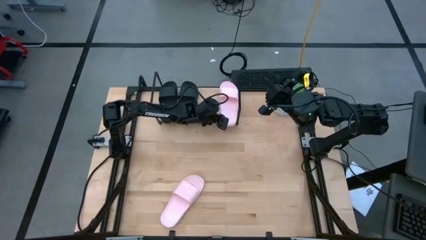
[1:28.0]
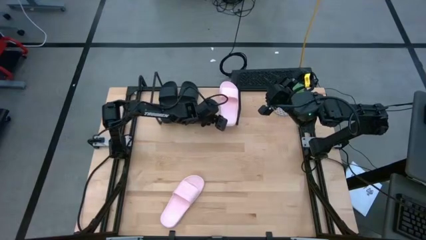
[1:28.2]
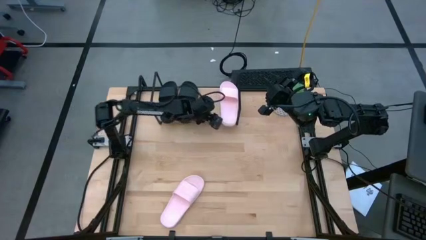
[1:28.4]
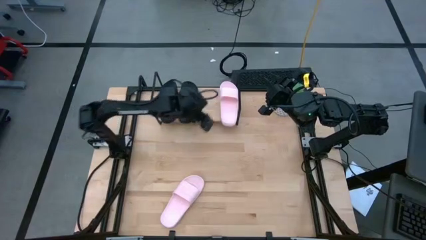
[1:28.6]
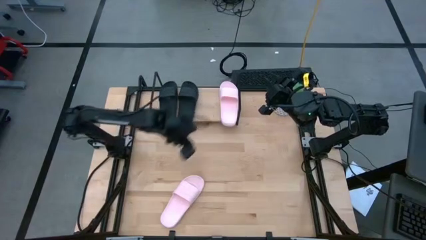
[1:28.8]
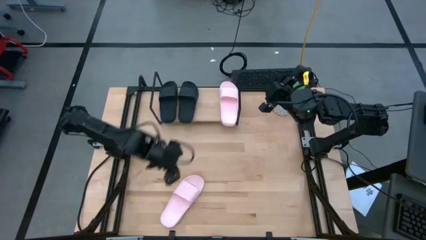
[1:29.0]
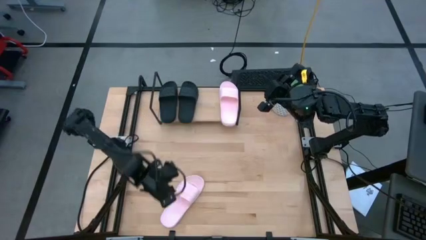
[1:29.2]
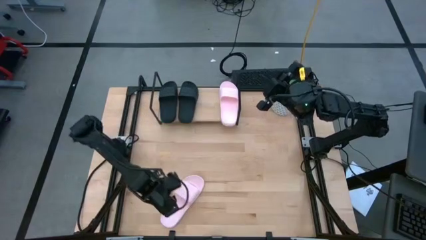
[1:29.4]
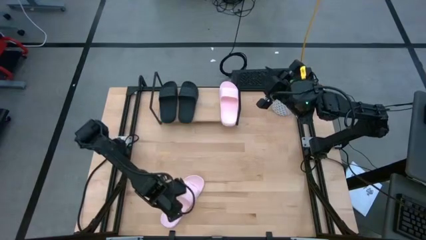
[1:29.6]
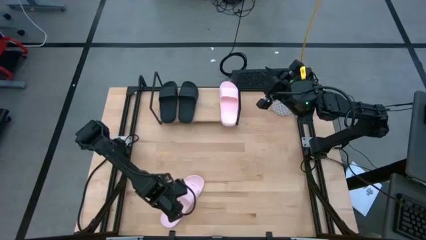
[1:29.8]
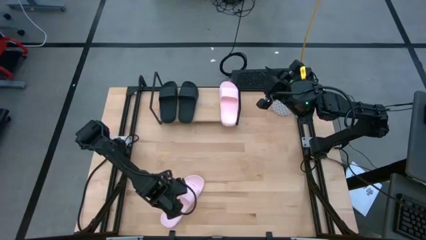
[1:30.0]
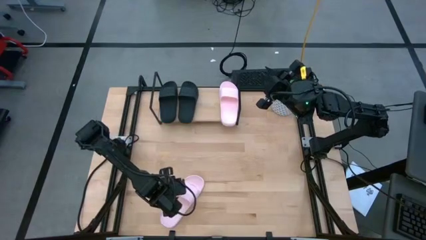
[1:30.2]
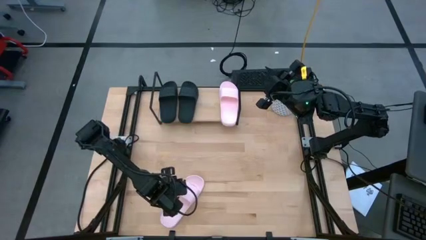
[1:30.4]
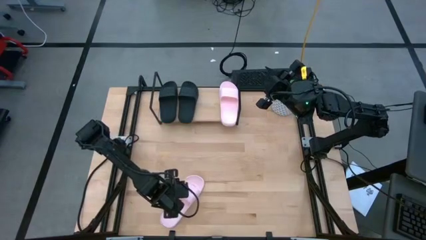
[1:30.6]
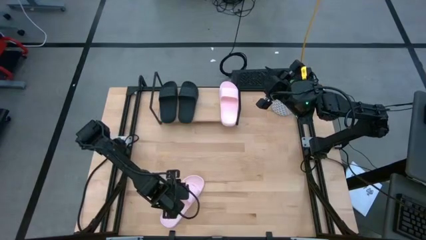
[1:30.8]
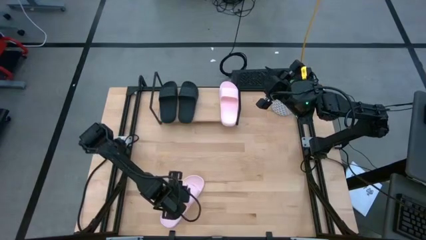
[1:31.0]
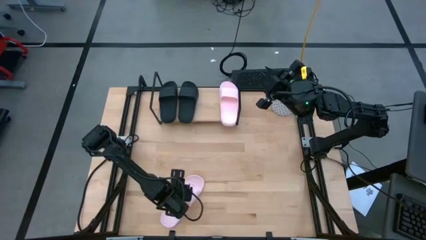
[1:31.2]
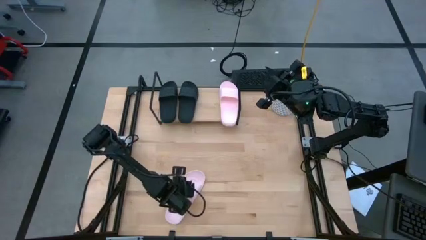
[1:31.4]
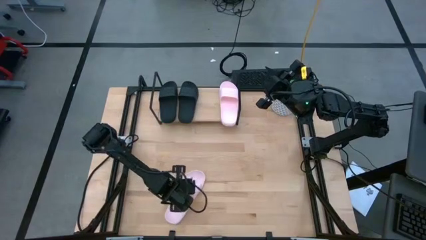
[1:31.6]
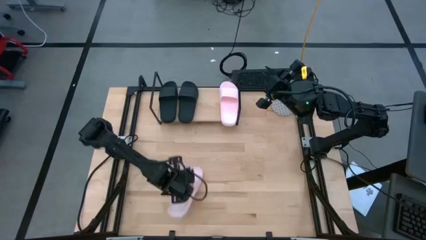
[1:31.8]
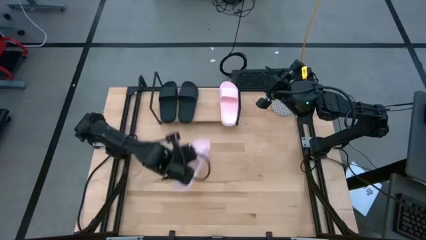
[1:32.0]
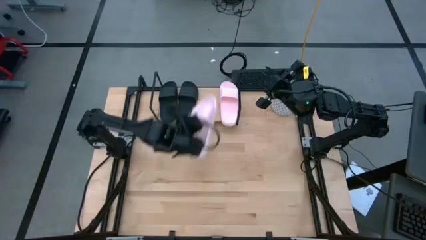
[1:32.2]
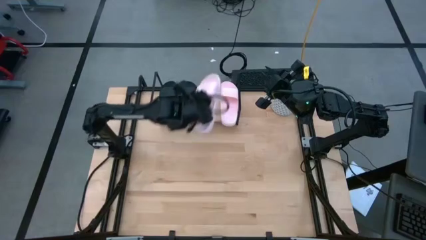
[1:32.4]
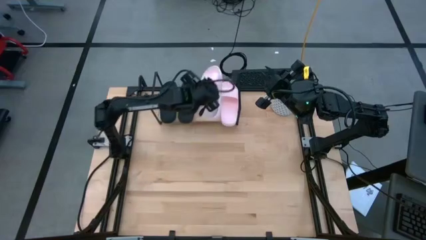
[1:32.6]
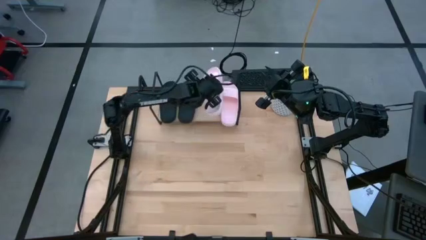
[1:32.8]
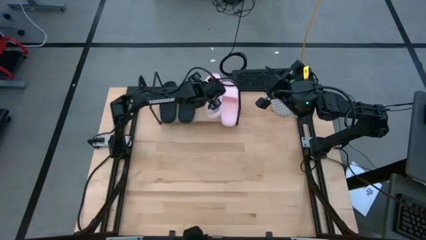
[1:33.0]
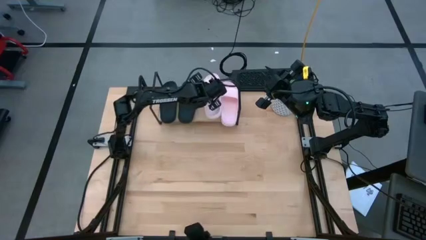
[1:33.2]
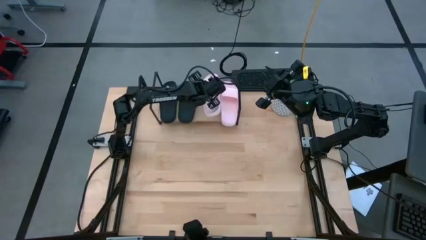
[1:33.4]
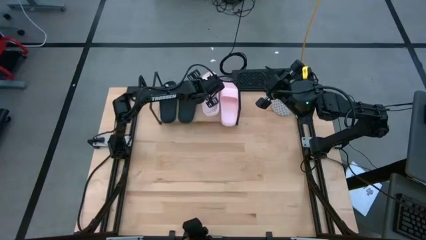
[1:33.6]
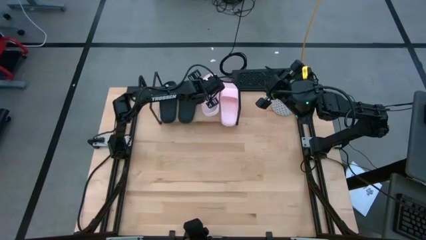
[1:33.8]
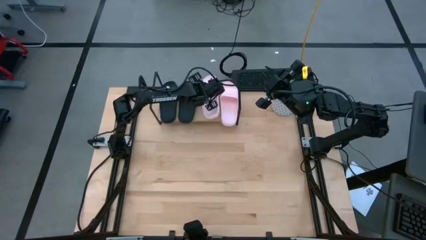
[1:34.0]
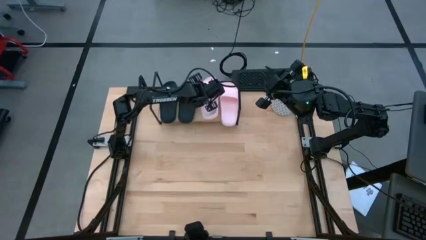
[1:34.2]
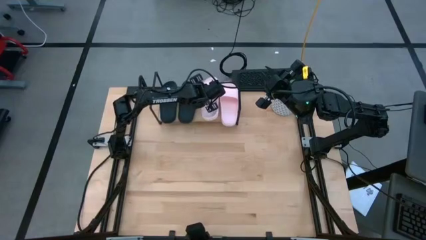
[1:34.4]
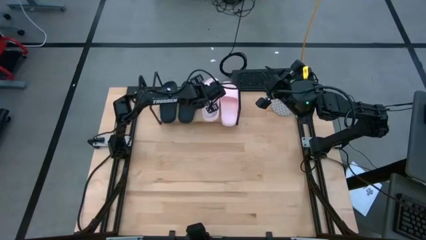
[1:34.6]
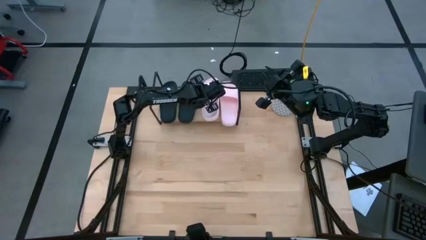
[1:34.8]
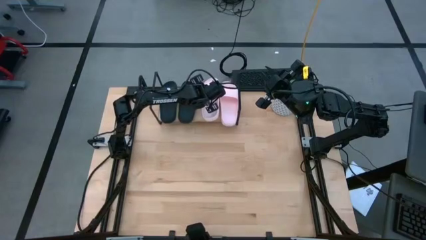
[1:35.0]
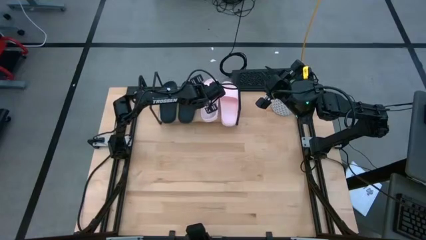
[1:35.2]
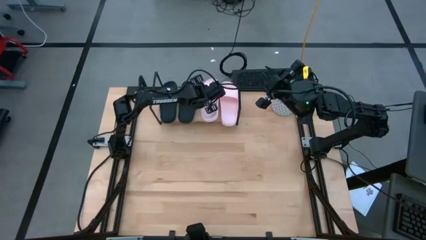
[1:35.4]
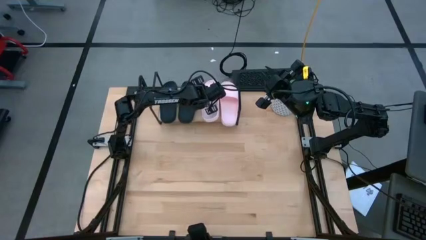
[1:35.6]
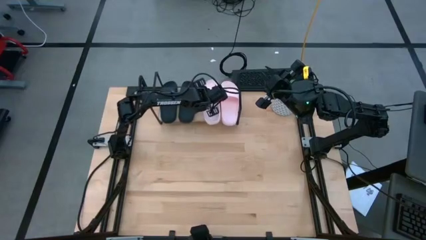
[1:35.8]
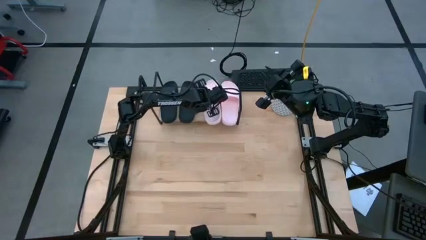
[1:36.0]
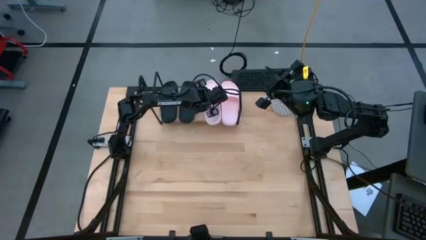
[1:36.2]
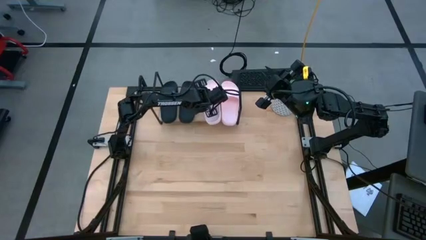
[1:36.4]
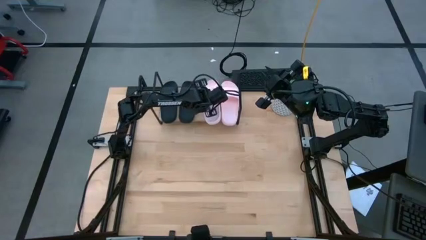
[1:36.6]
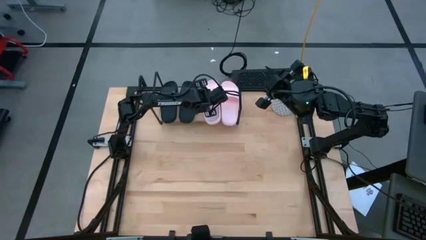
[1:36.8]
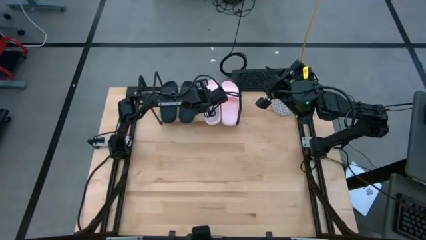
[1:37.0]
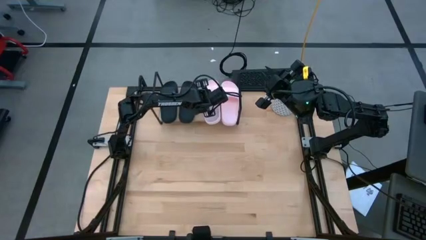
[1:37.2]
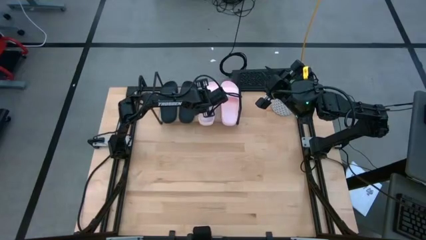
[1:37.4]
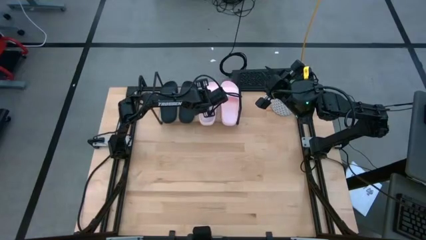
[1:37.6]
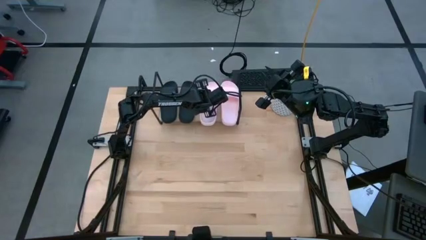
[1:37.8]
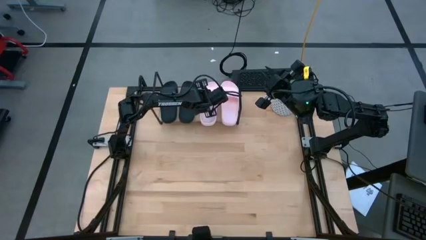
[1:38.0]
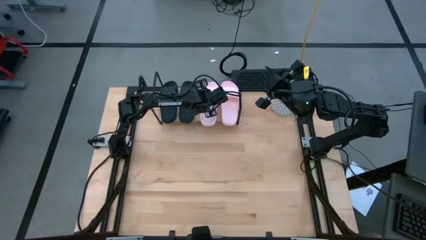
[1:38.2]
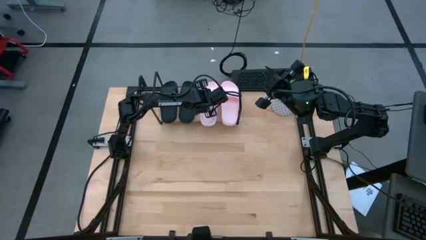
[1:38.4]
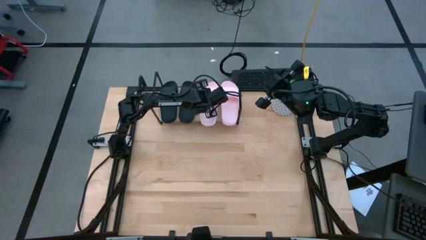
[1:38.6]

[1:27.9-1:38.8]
Task: Pick and place slides into the shelf
Put the pink slipper on the shelf

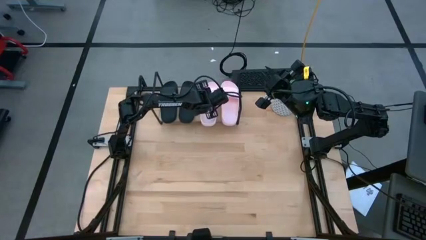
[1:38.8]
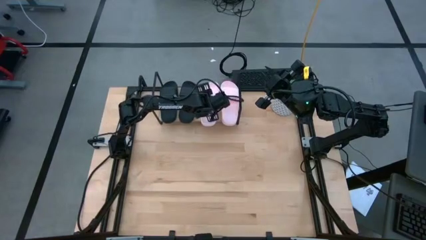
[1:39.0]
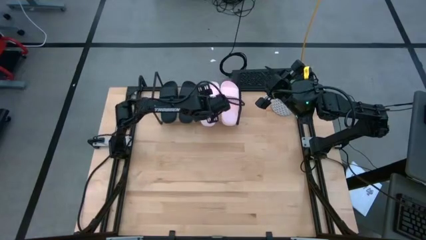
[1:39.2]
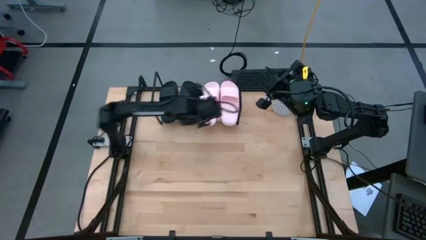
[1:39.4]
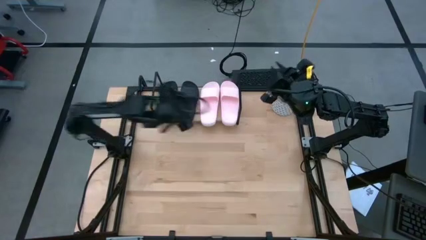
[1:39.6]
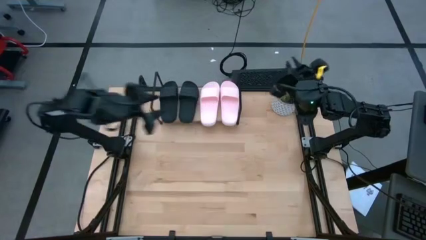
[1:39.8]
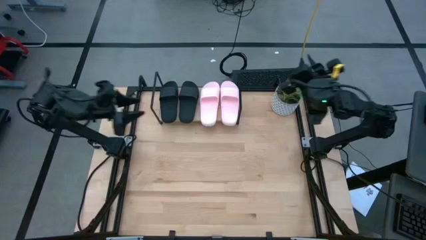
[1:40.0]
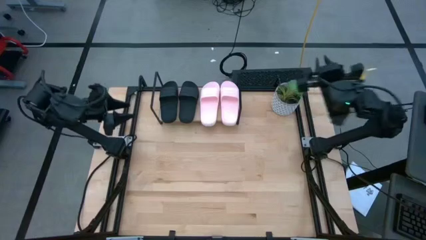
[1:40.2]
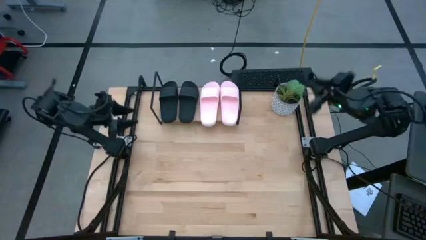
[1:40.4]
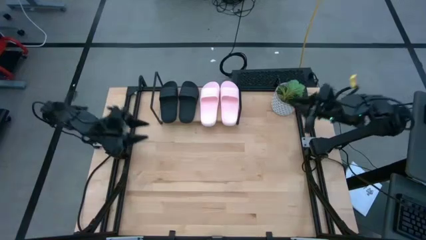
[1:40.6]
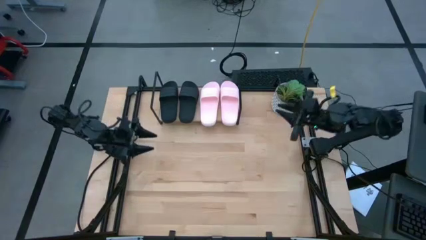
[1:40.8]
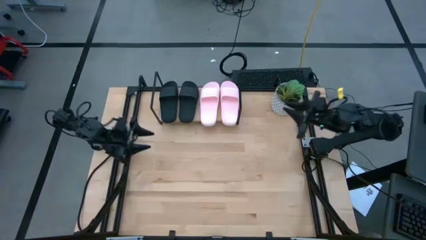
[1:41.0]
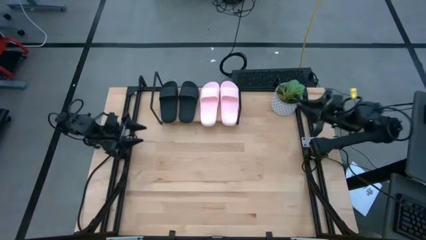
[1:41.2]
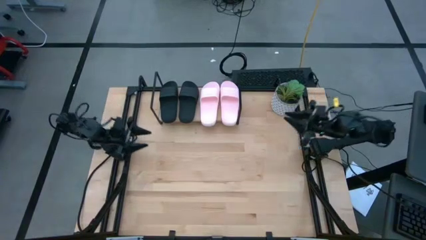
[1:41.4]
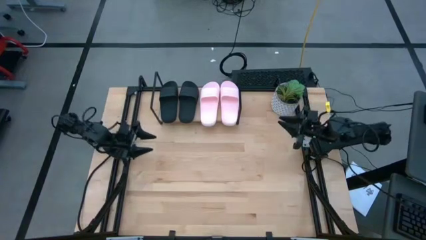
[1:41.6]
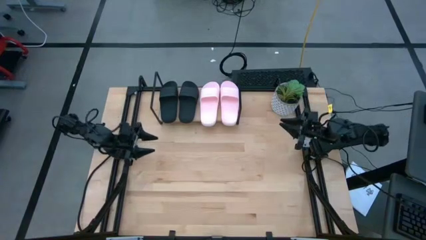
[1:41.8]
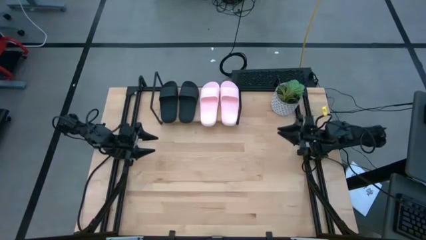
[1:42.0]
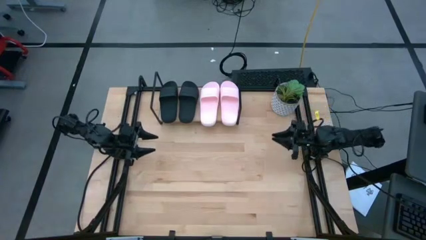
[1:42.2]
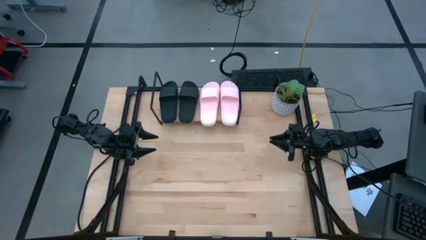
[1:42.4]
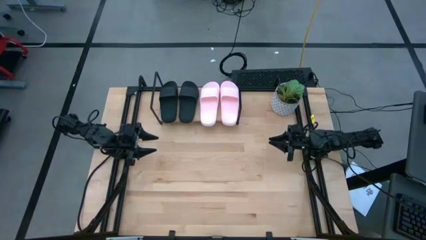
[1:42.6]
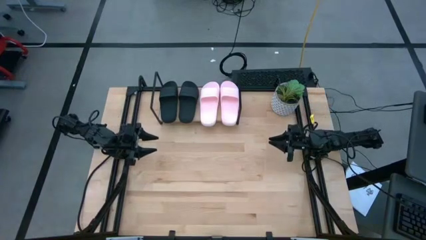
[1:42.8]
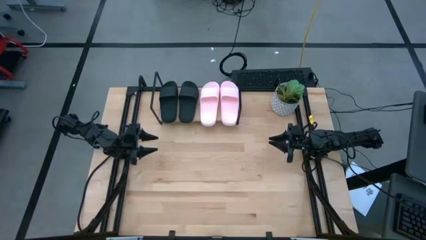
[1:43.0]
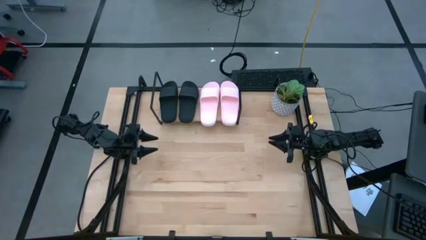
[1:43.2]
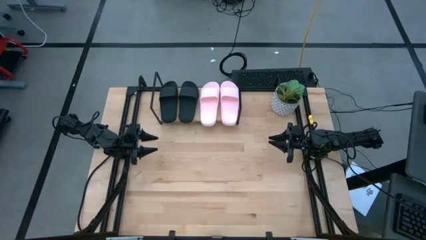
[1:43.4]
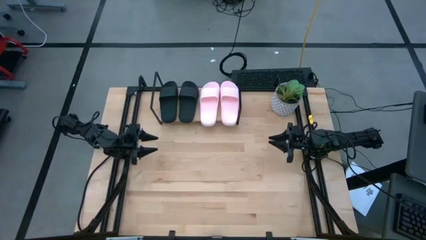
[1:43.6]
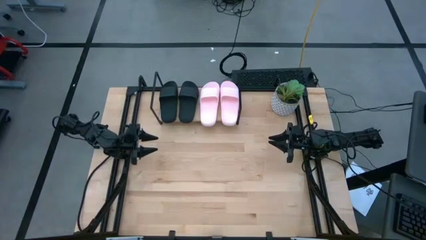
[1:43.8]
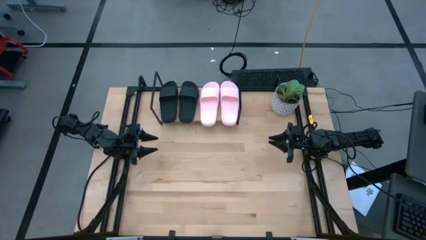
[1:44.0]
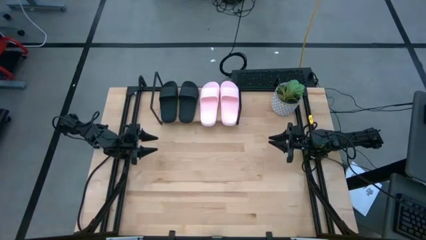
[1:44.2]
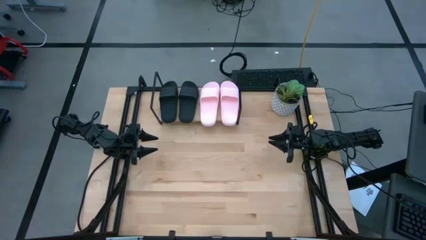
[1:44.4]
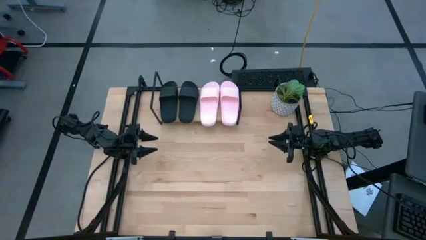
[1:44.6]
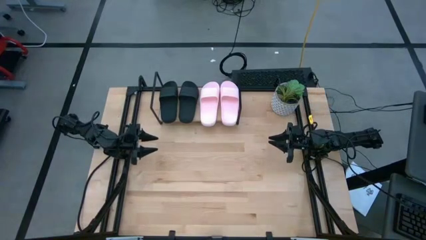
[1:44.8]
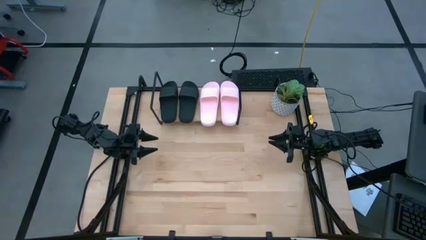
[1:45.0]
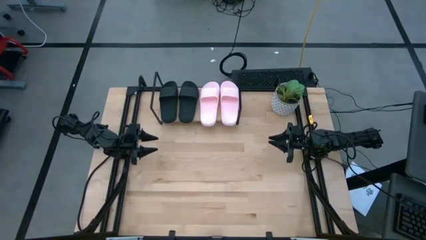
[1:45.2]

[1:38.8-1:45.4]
Return to Home Position
